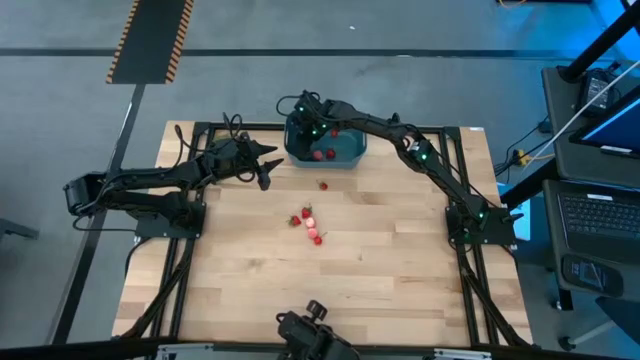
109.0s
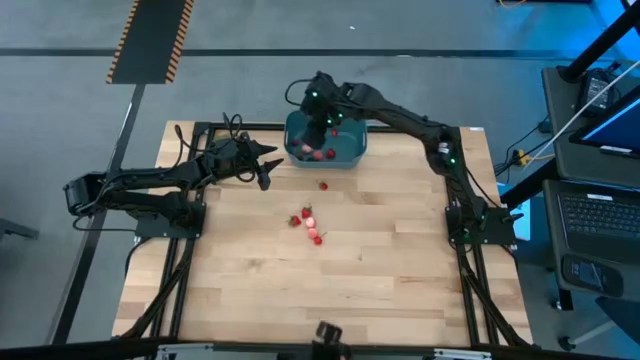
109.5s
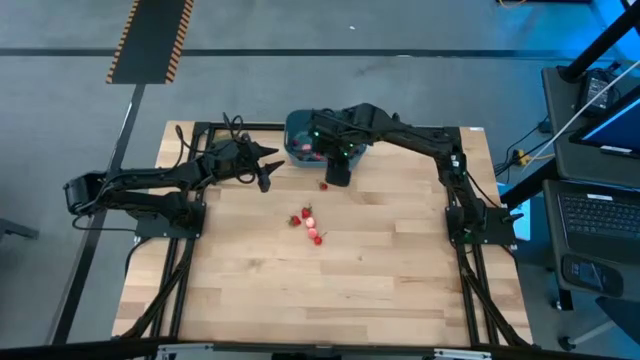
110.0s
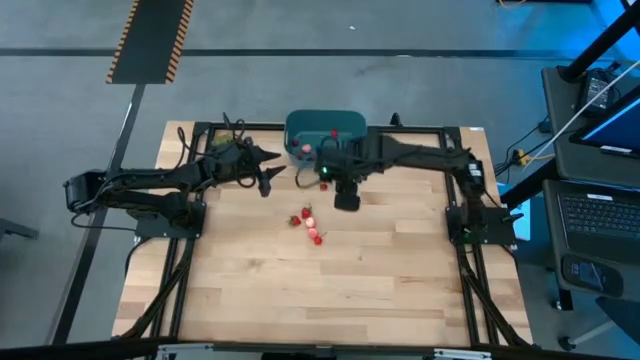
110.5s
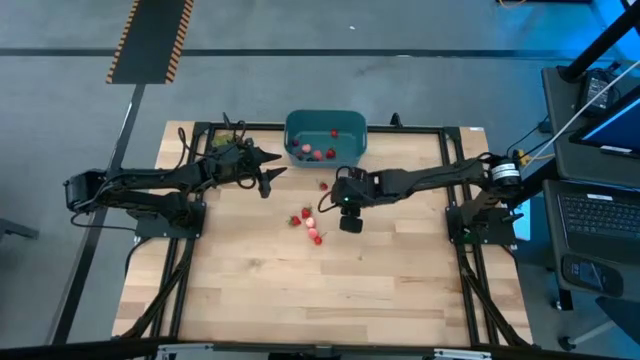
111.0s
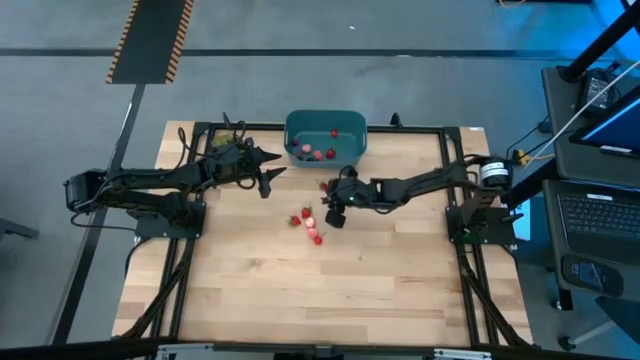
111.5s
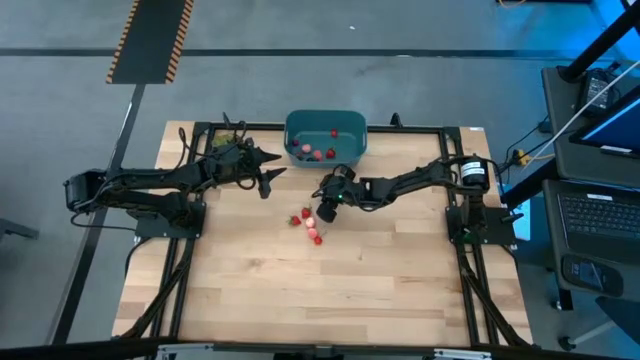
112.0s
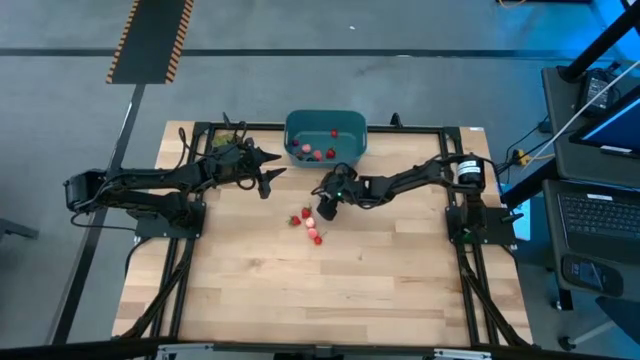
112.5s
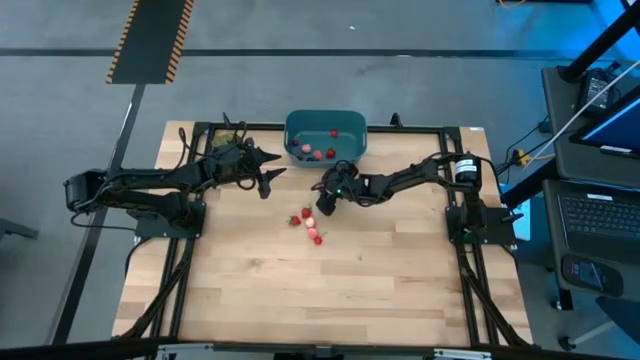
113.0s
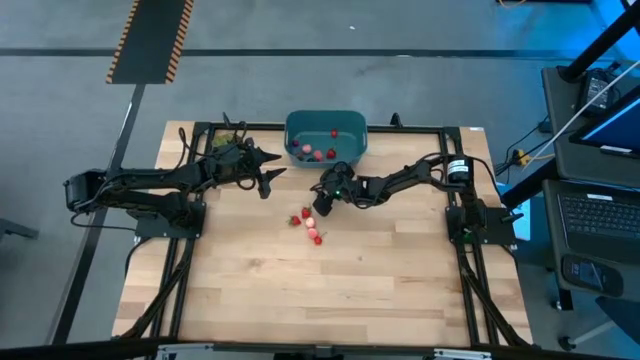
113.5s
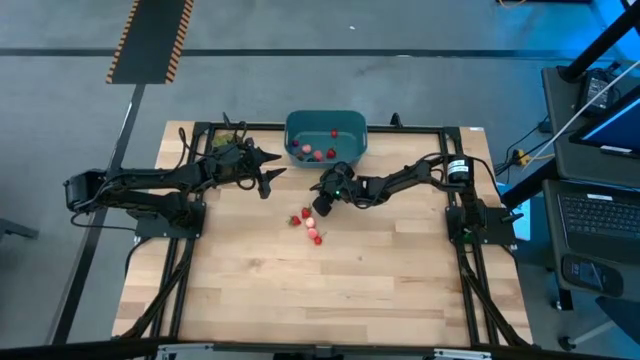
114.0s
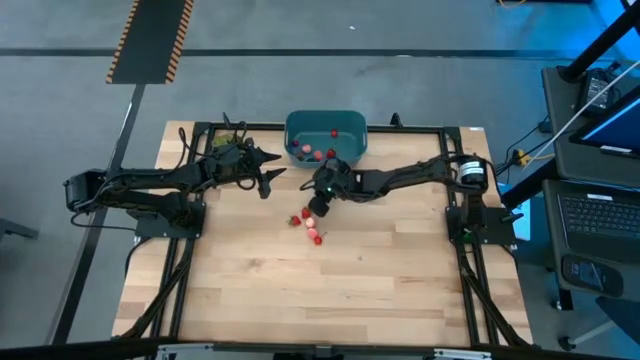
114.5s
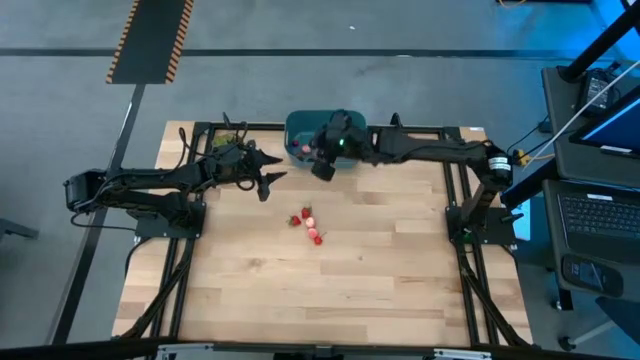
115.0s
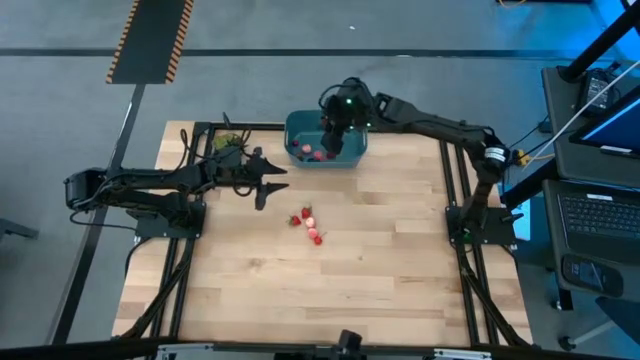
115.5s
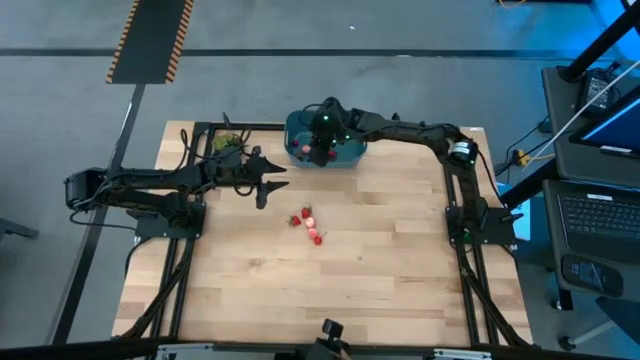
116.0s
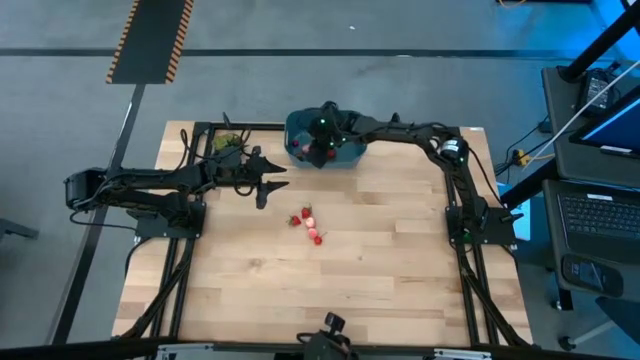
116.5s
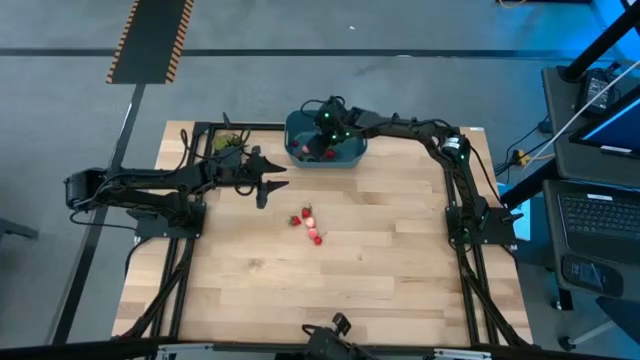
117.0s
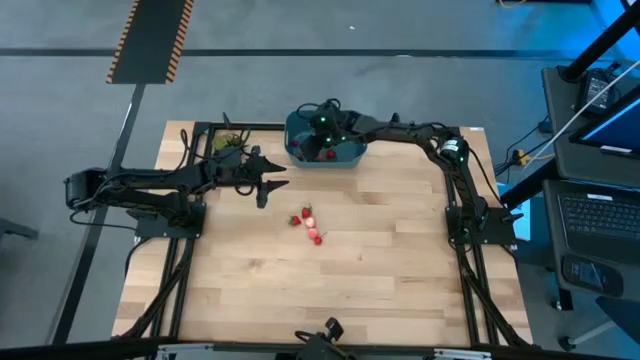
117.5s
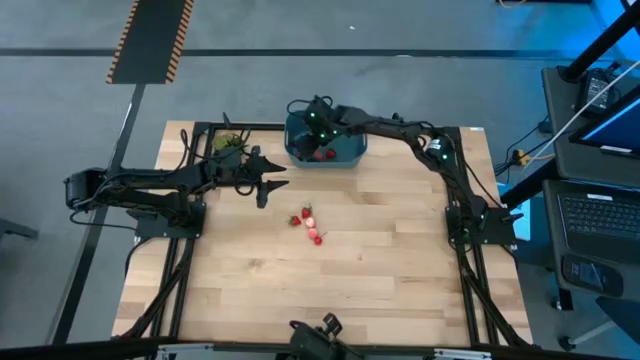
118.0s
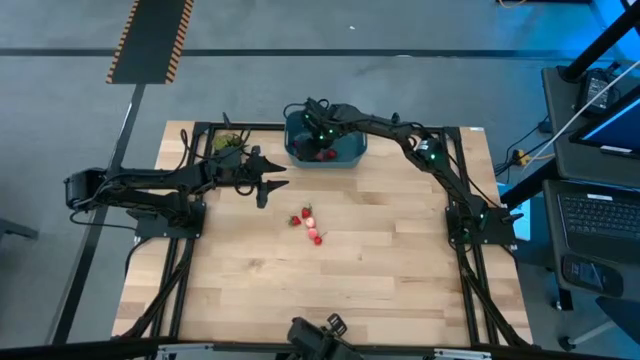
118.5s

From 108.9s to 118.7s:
Task: Pick and placing Produce into tupperware
Put the strawberry into the blue bin

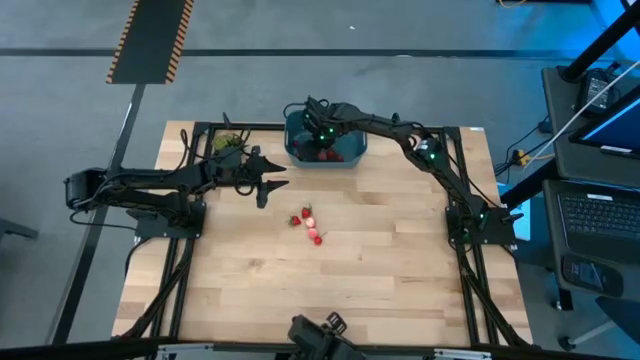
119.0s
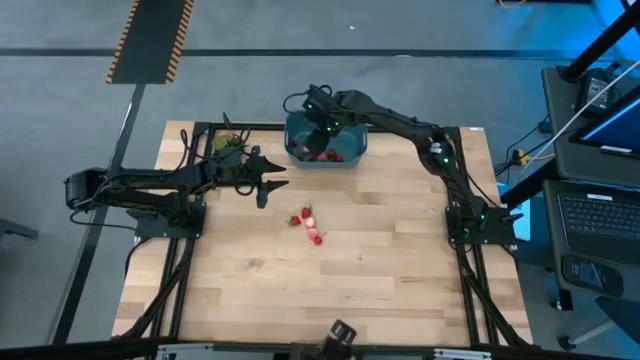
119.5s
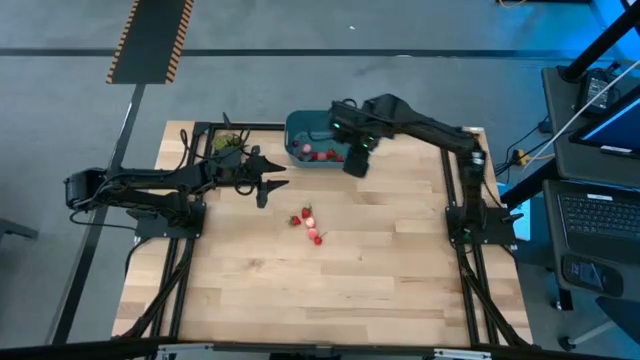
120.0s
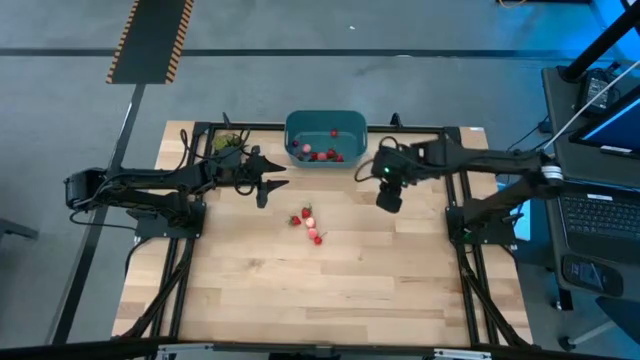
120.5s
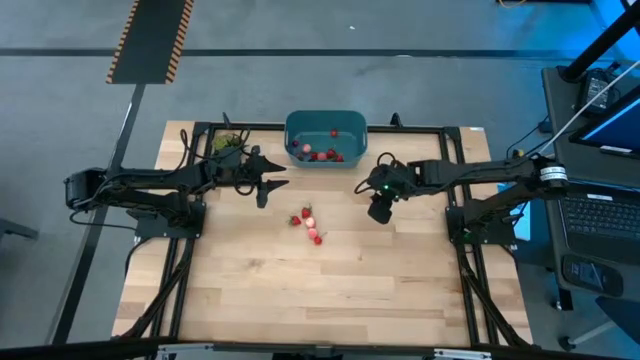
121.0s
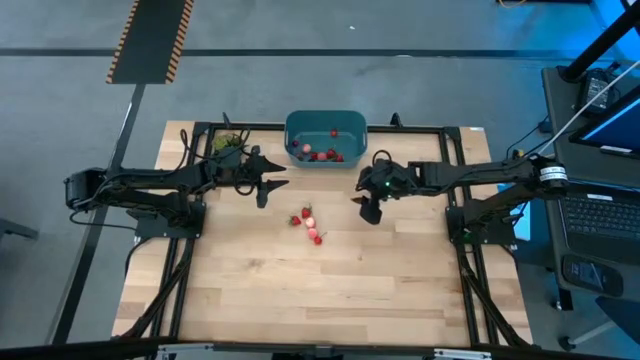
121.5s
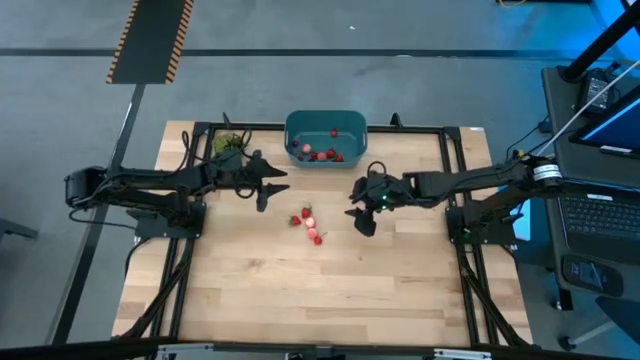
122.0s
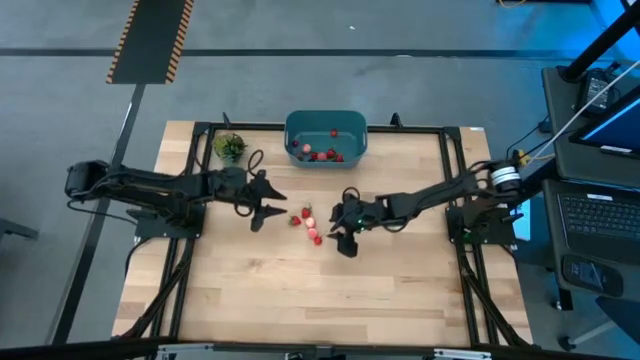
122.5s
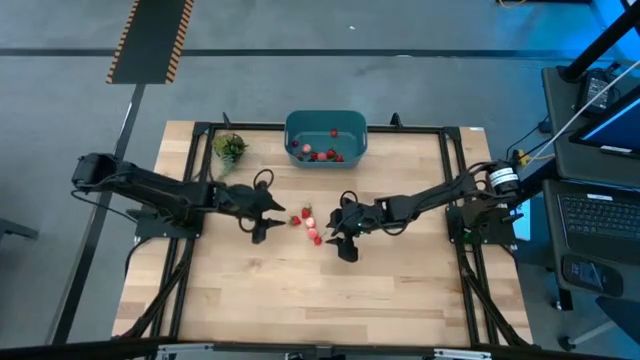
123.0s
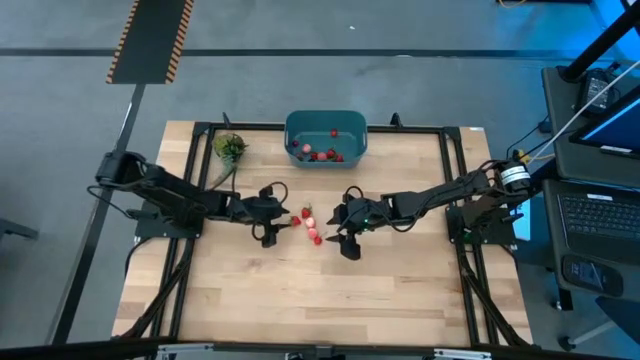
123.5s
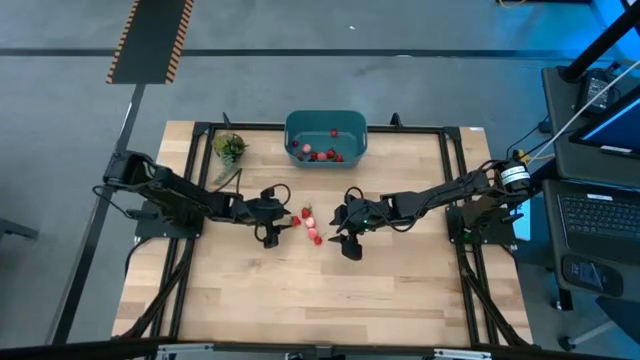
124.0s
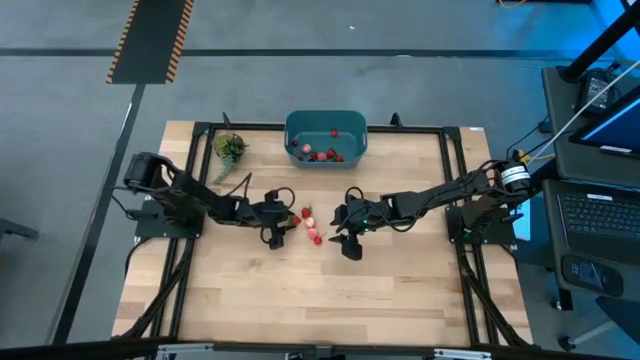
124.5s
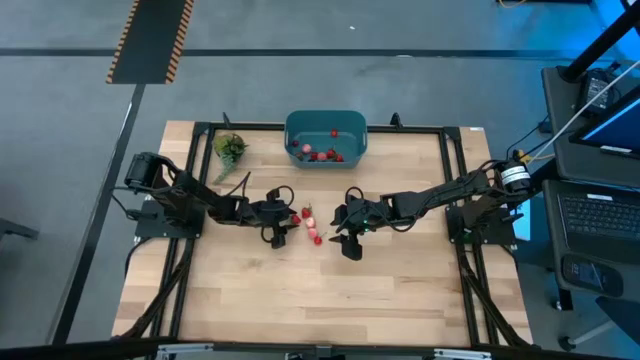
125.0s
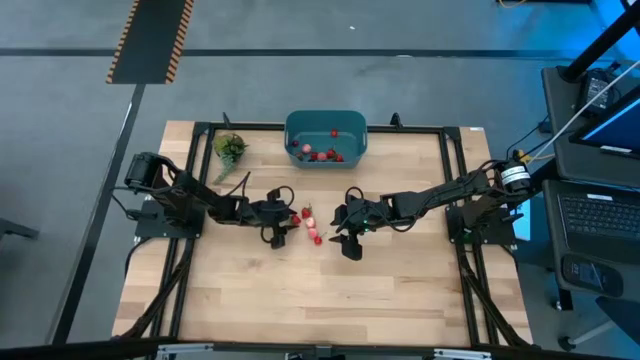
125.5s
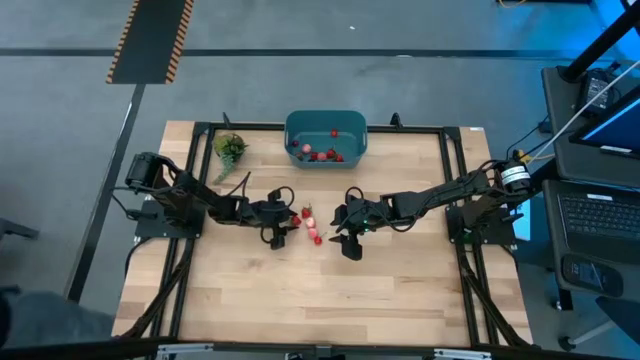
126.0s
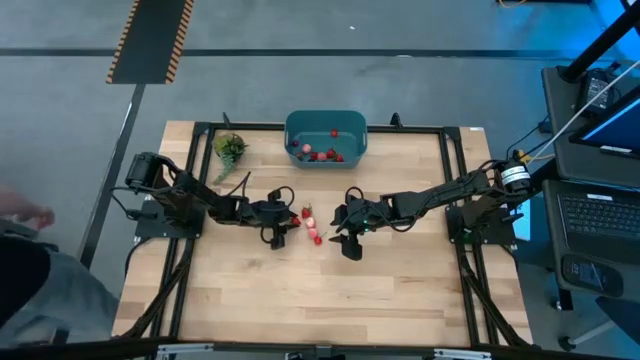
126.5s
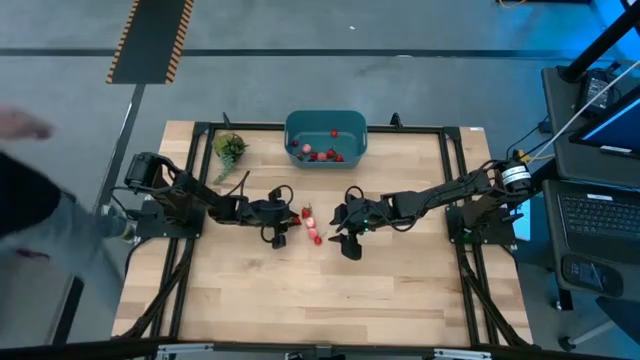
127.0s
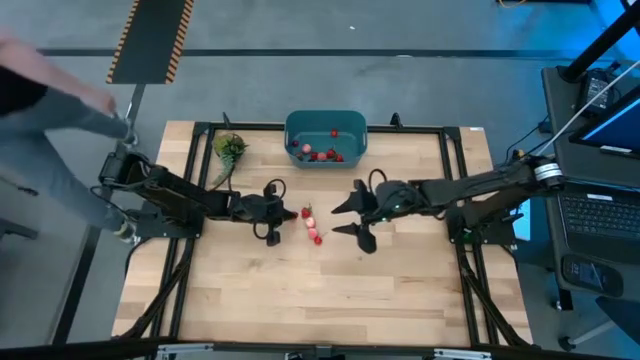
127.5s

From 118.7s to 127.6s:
Put the strawberry into the blue bin

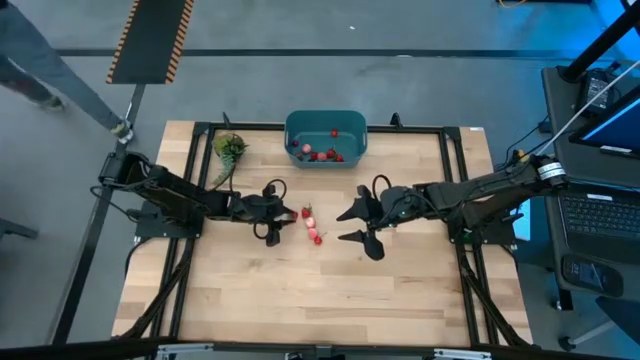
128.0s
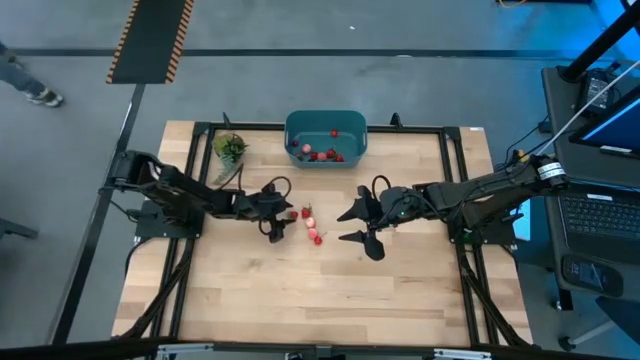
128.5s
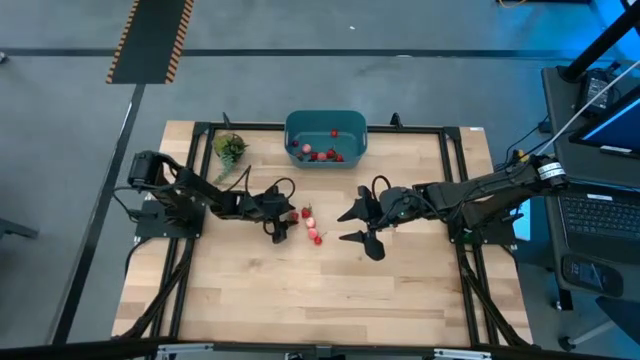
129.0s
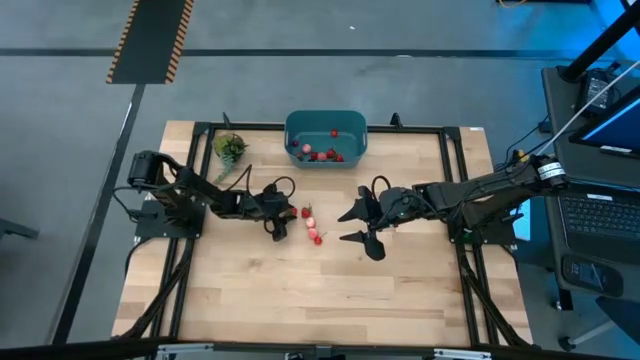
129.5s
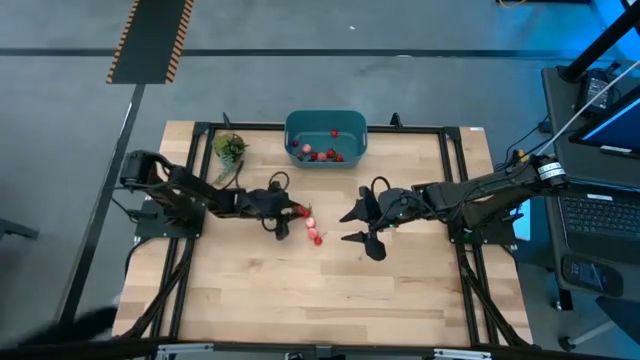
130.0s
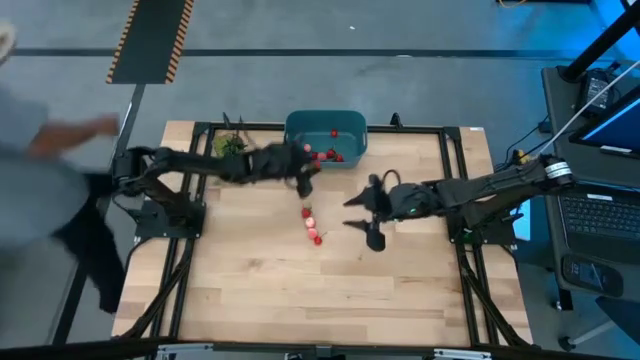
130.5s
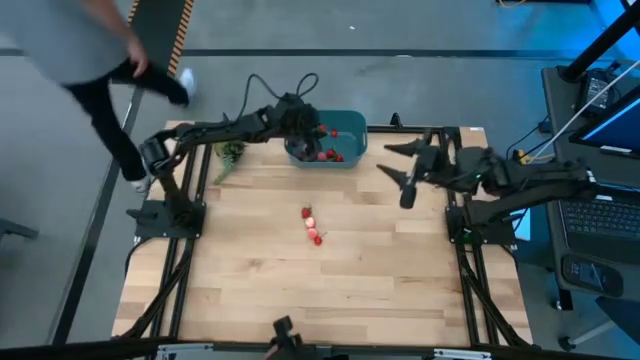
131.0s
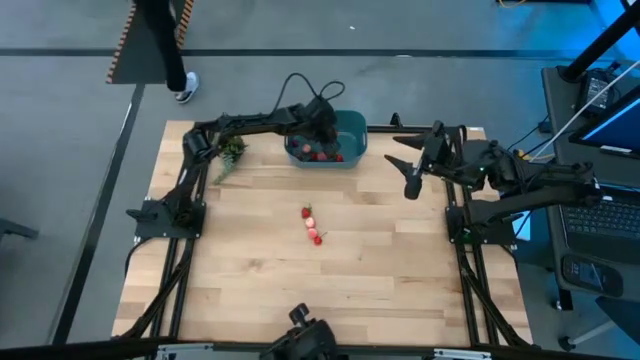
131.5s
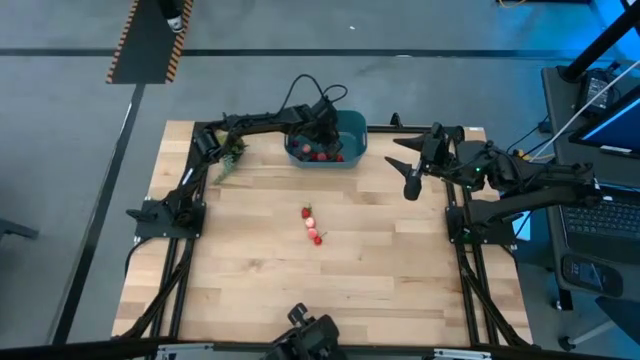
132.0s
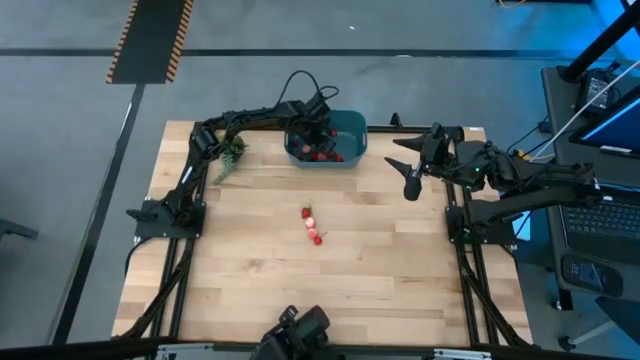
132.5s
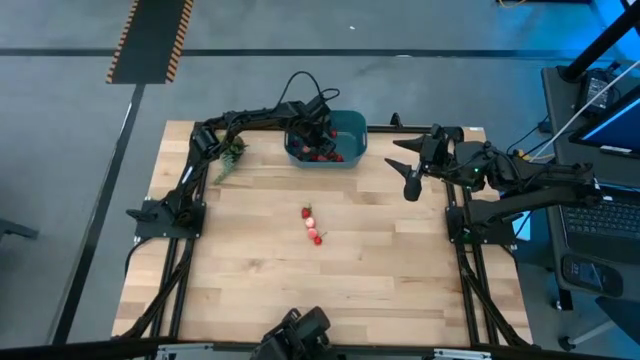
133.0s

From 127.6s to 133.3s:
Put the strawberry into the blue bin
